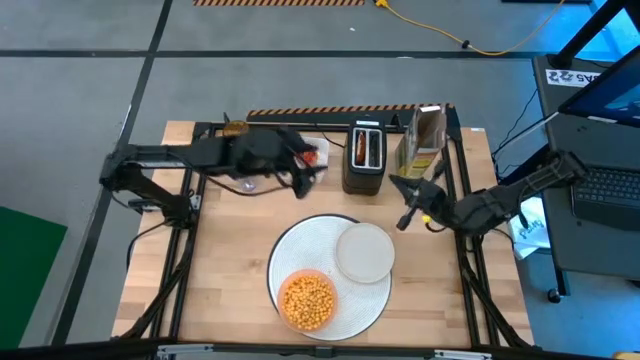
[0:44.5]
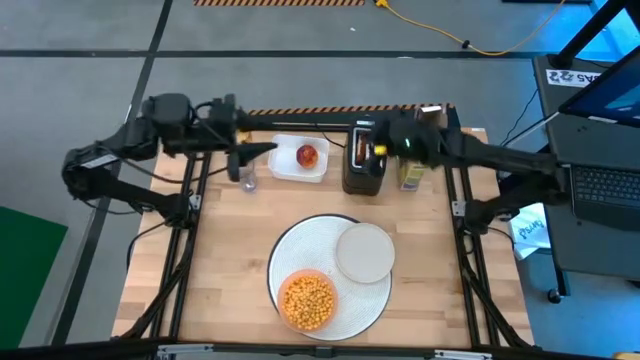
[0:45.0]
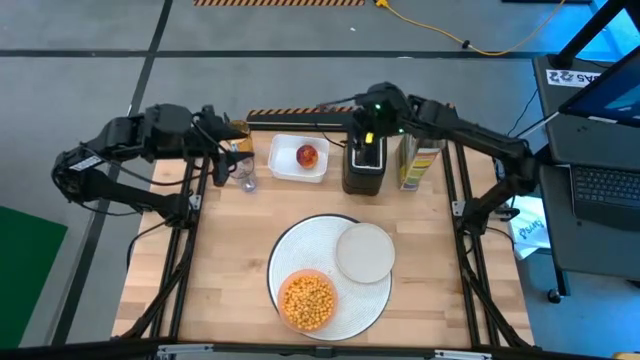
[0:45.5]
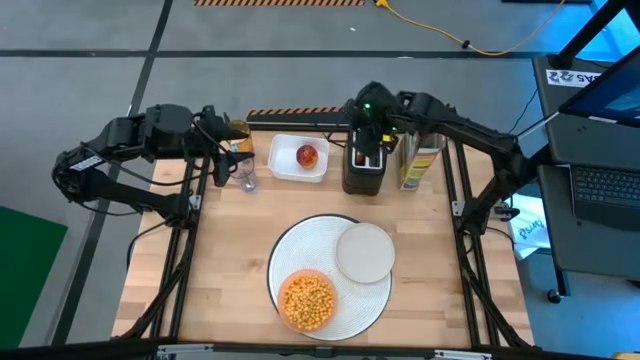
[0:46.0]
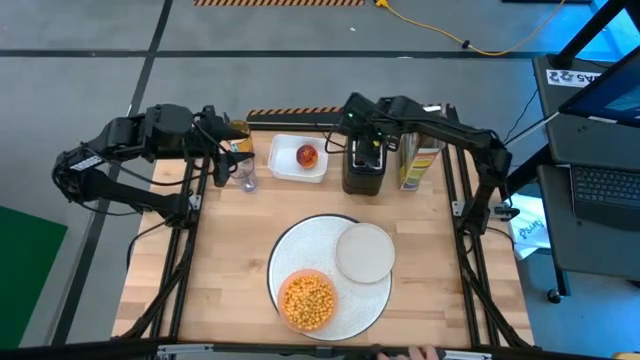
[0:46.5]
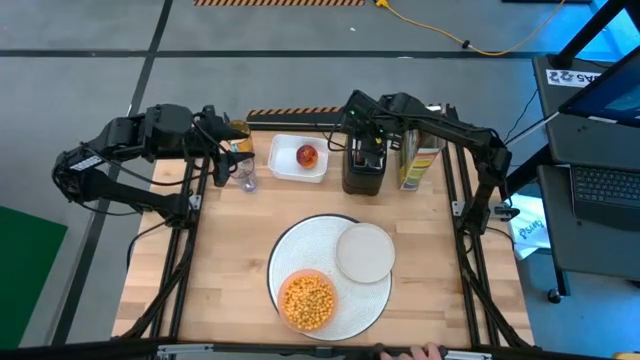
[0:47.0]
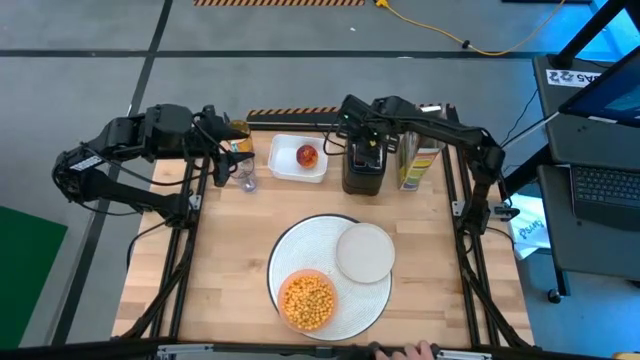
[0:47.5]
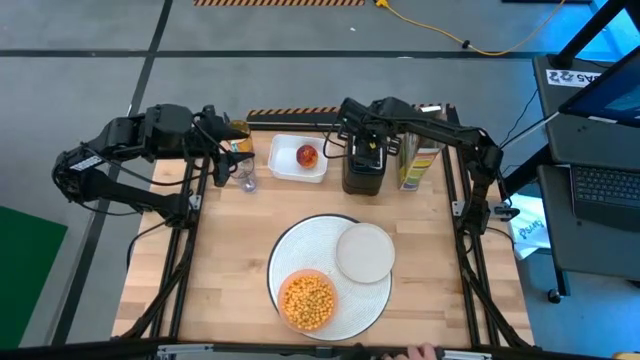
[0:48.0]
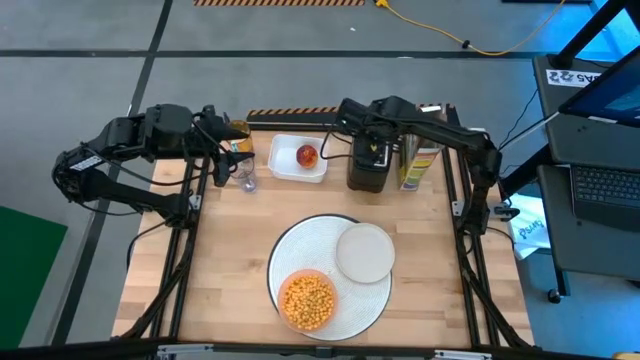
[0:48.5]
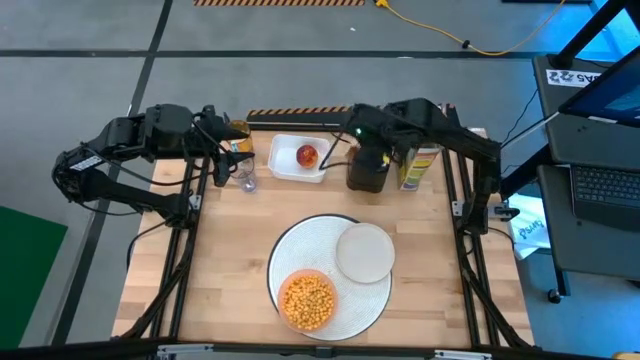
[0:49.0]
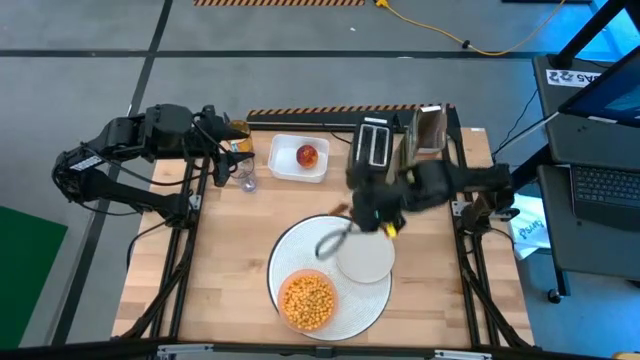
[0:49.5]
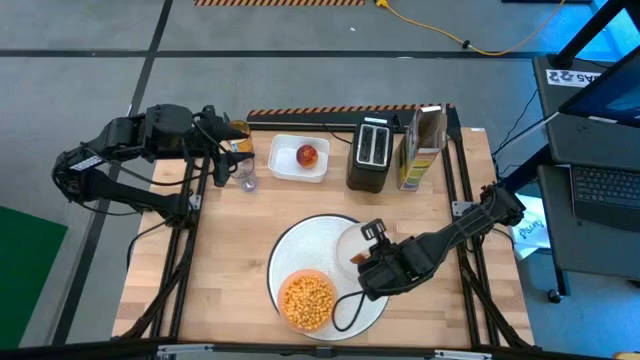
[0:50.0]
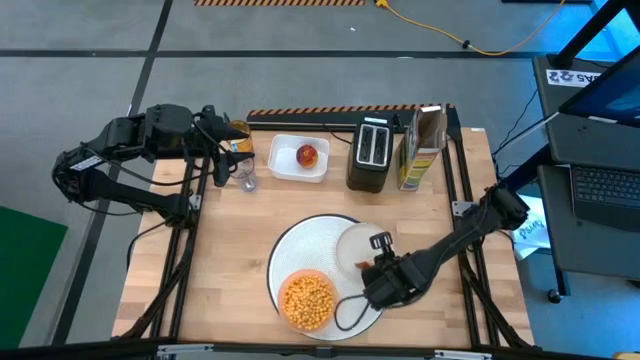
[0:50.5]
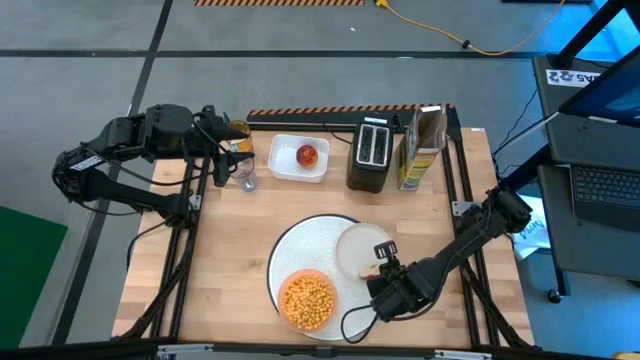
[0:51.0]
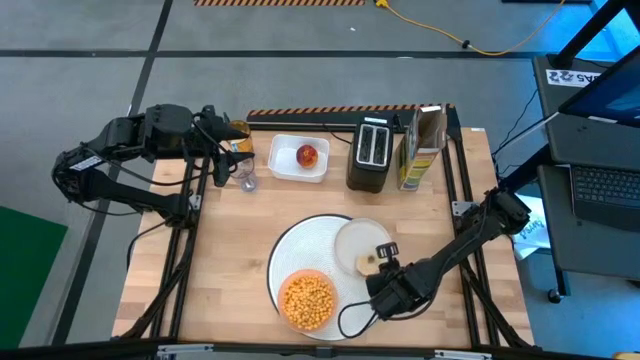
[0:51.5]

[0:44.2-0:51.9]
Task: Arrange a breakfast setting
Remove the toasted bread from the black toaster

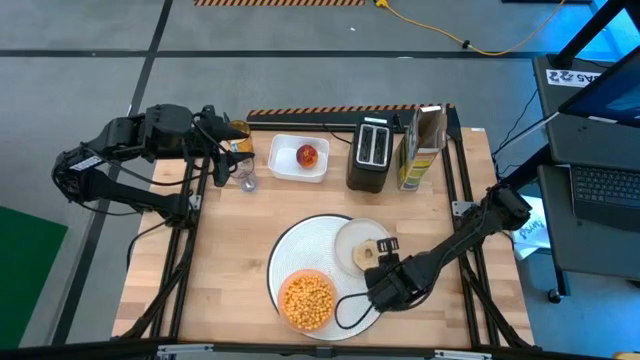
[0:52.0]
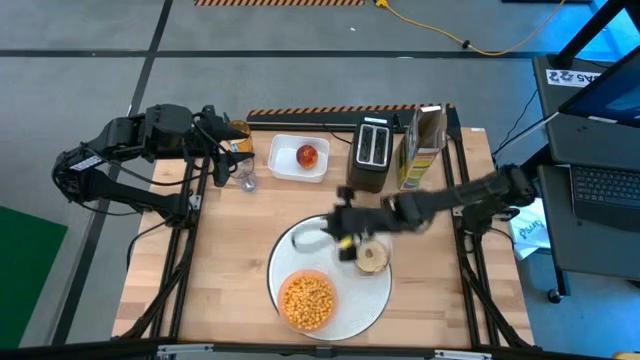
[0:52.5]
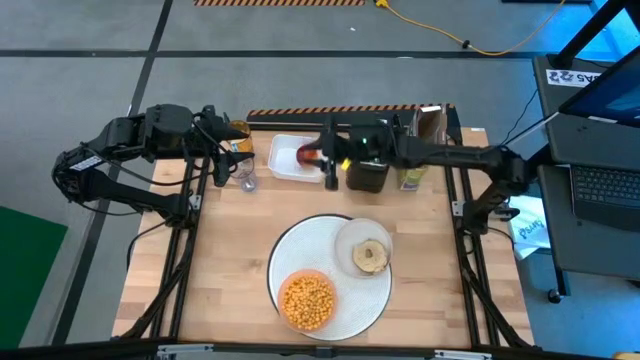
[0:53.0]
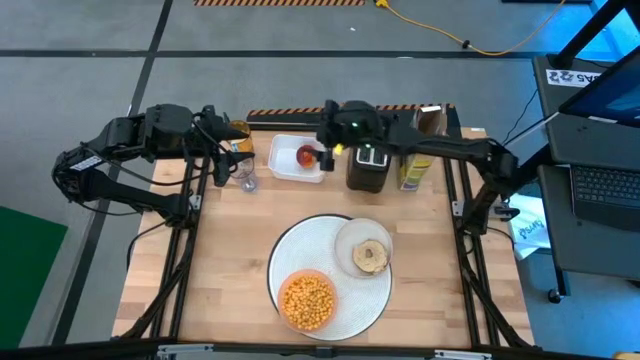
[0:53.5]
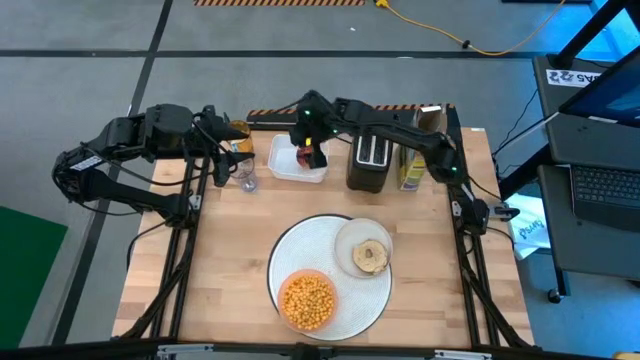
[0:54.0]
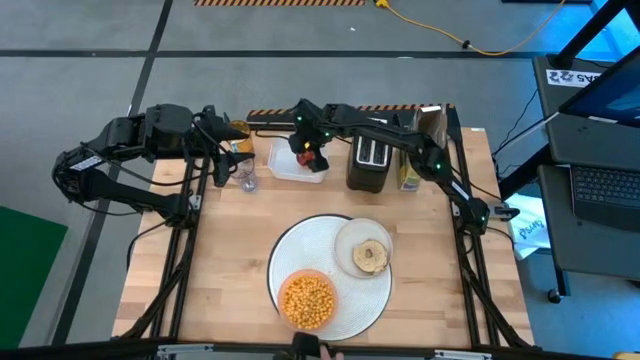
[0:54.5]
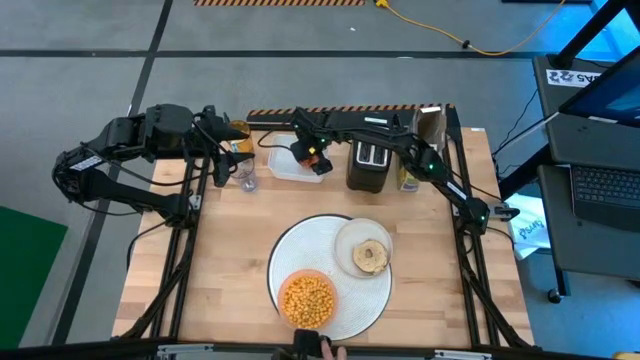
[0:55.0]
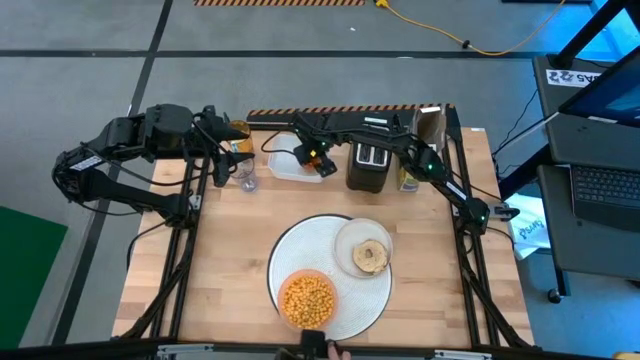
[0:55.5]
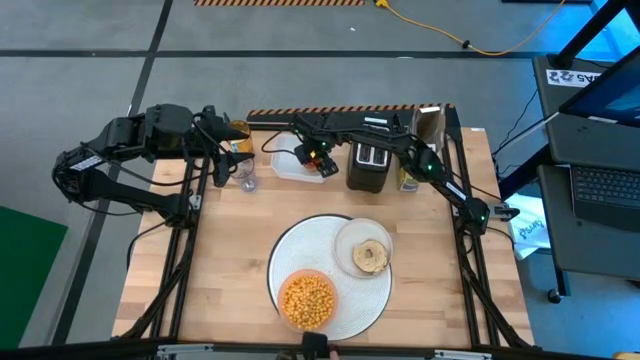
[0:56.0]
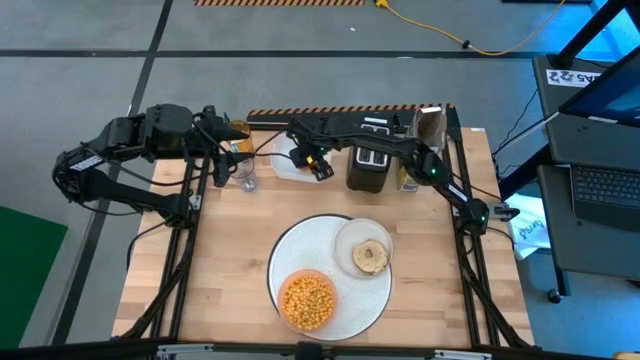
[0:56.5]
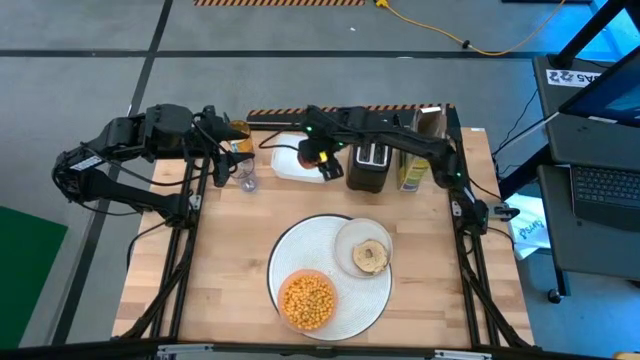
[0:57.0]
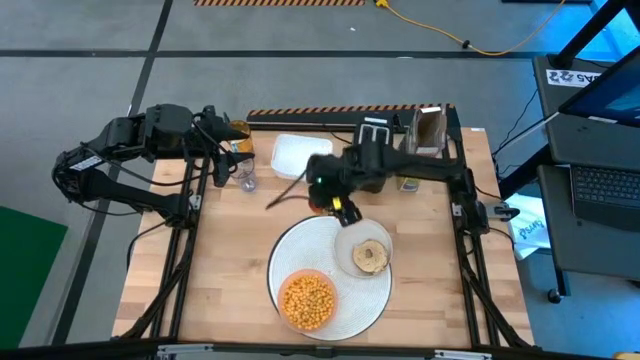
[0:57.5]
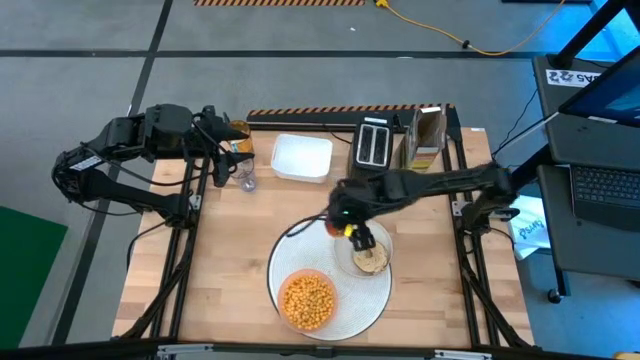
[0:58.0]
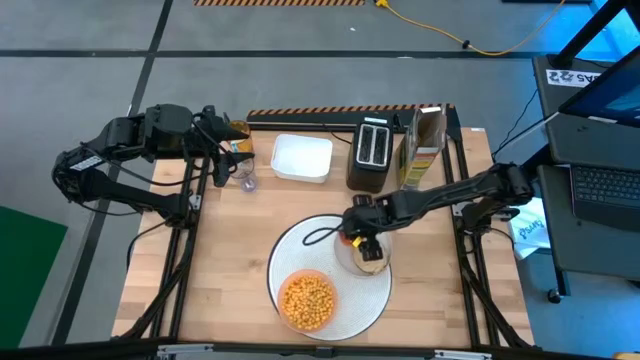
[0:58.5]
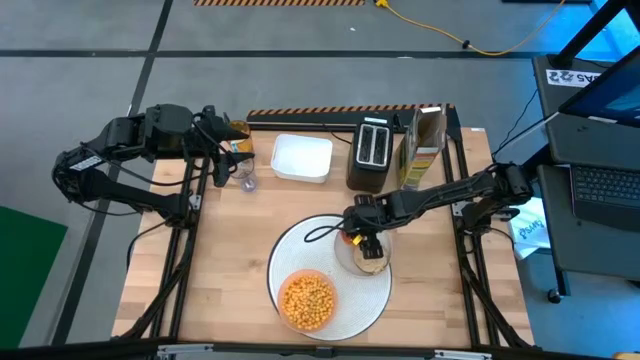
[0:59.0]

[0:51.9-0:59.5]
Put the red apple on the white plate

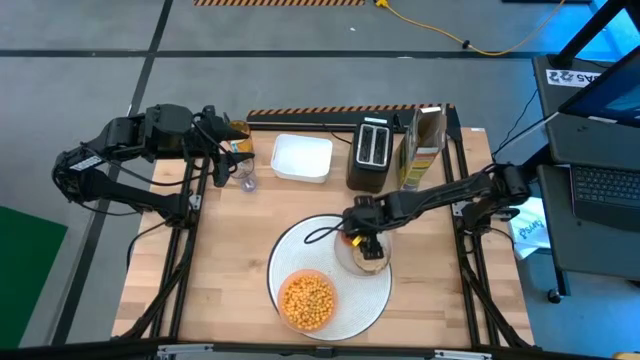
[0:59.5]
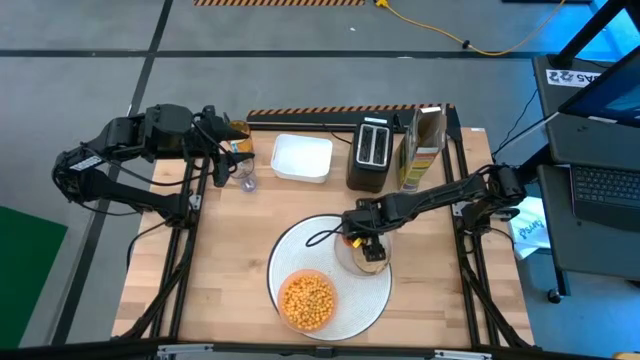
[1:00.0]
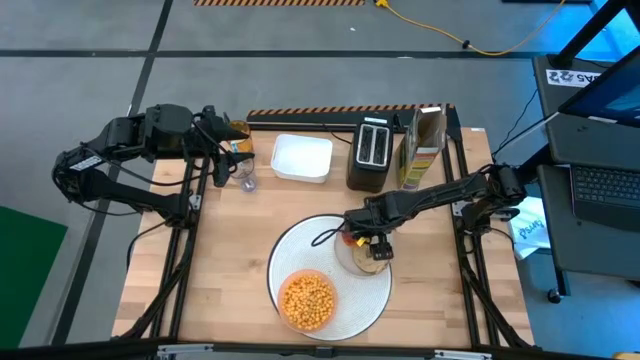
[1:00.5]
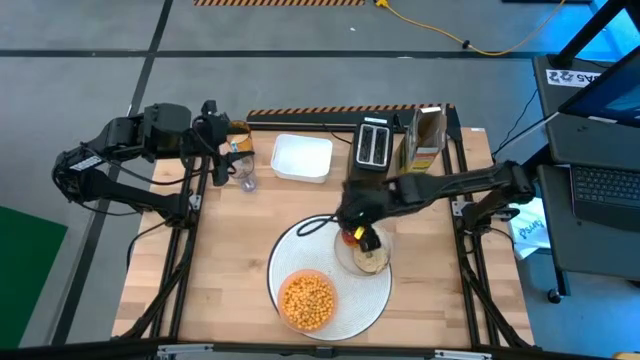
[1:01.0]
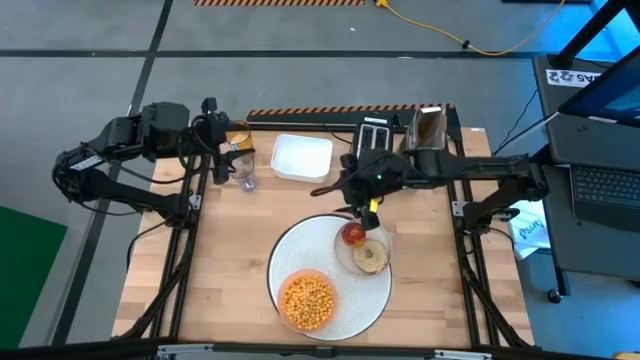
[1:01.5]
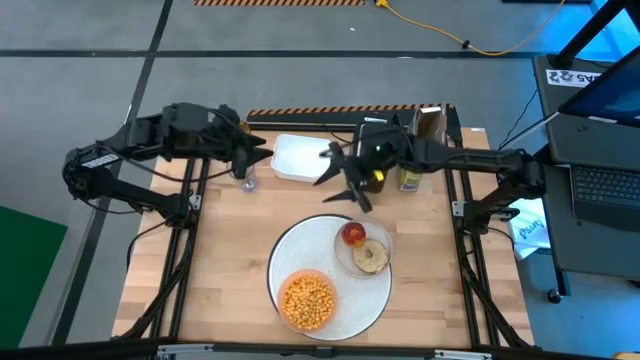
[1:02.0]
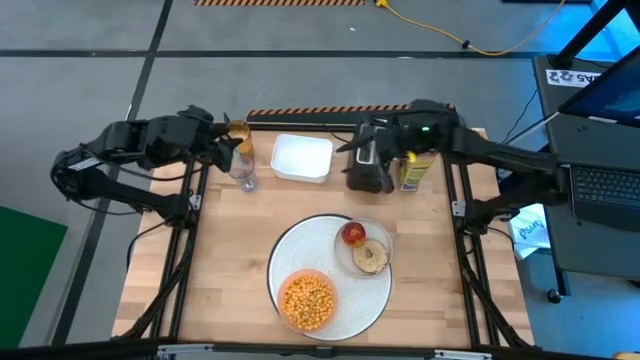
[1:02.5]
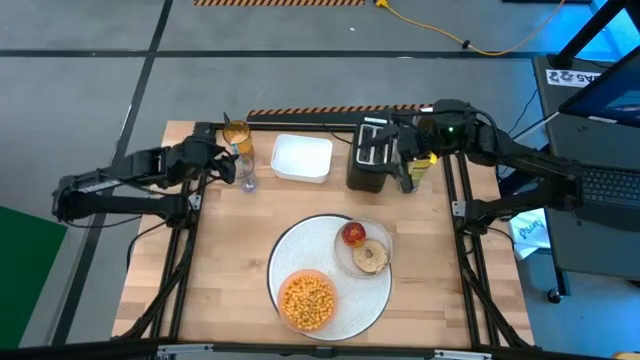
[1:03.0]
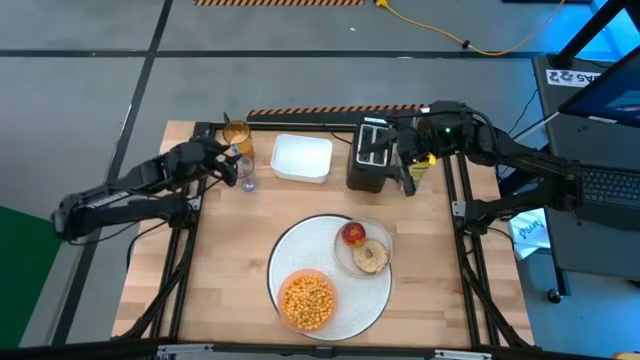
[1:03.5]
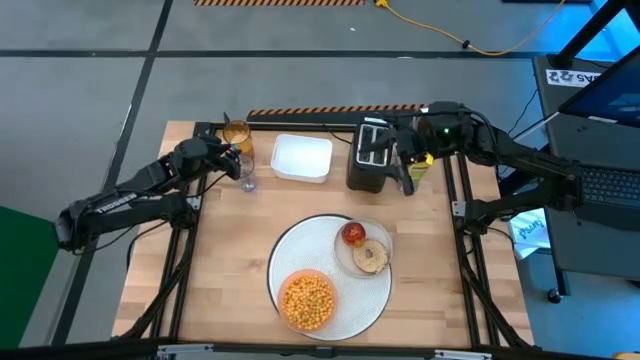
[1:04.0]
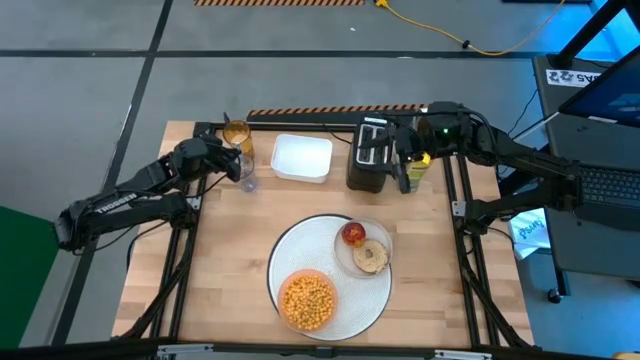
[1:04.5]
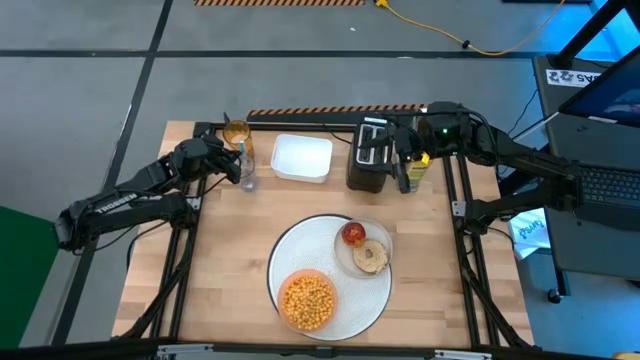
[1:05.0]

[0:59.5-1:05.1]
Put the blue spoon from the transparent cup onto the white plate
